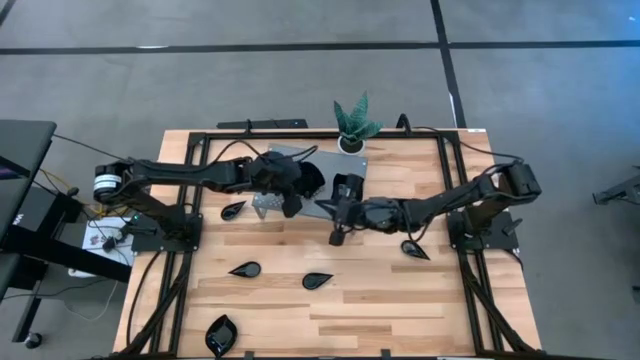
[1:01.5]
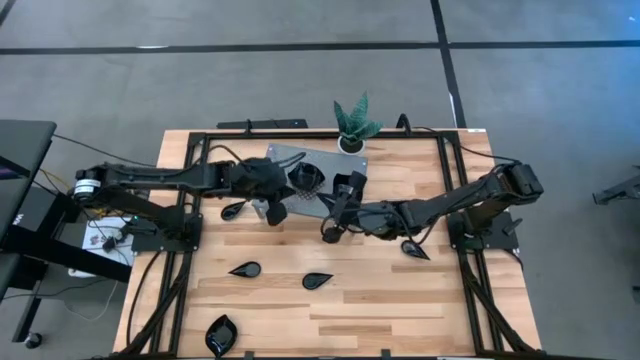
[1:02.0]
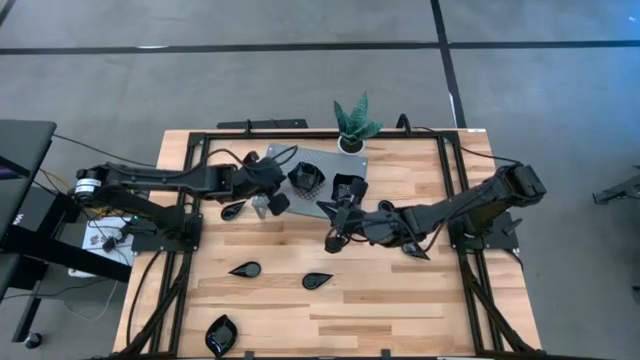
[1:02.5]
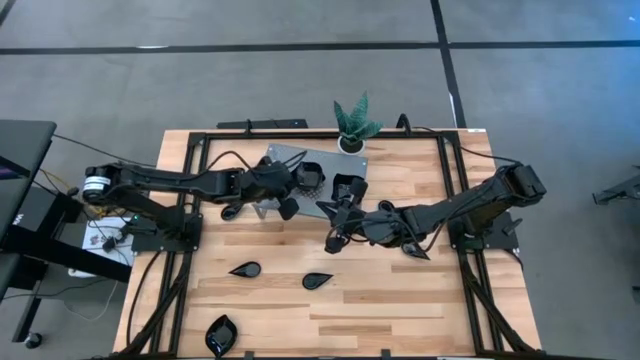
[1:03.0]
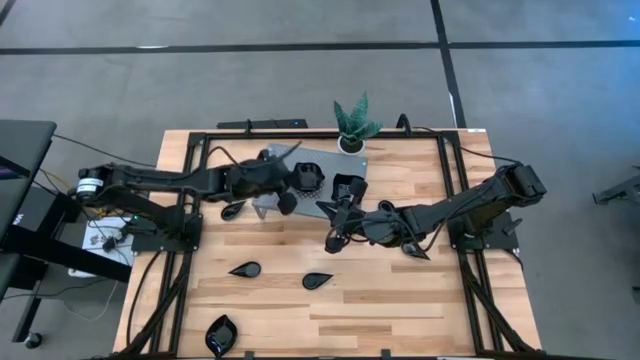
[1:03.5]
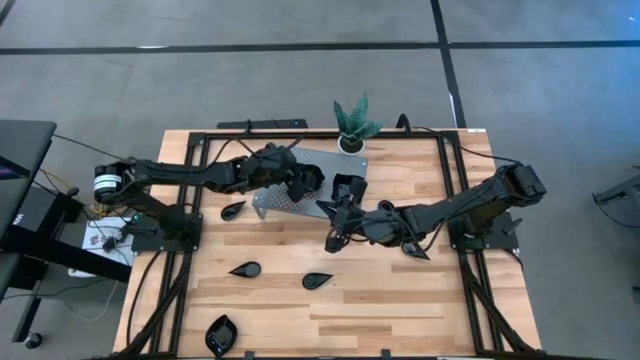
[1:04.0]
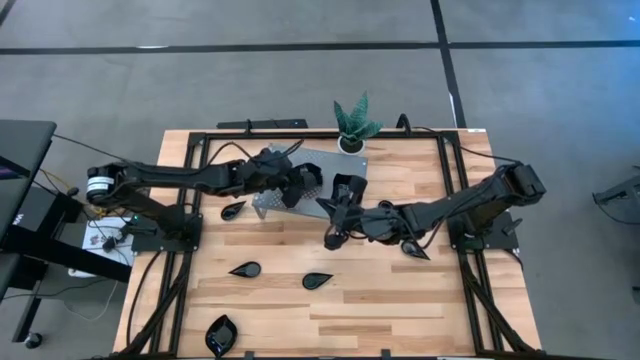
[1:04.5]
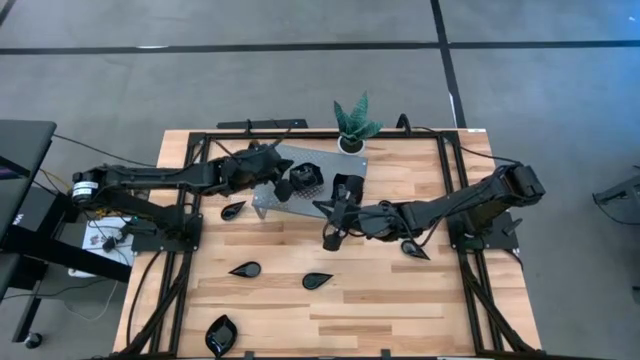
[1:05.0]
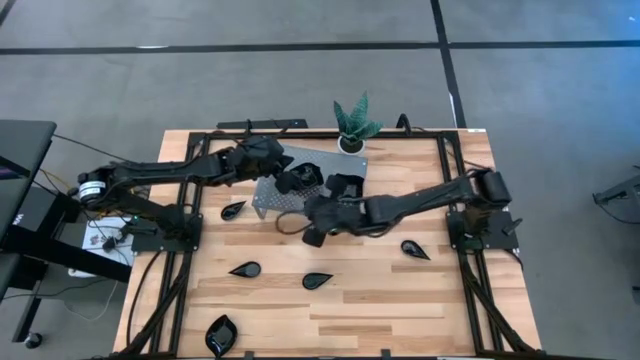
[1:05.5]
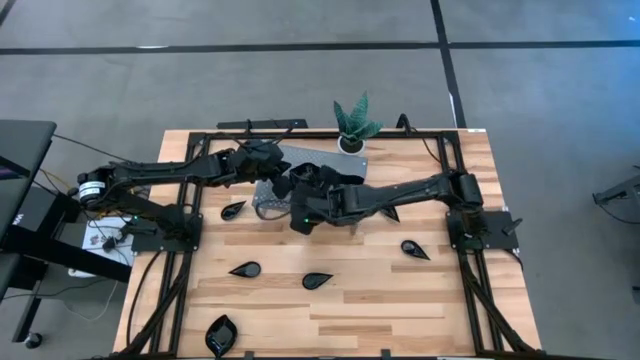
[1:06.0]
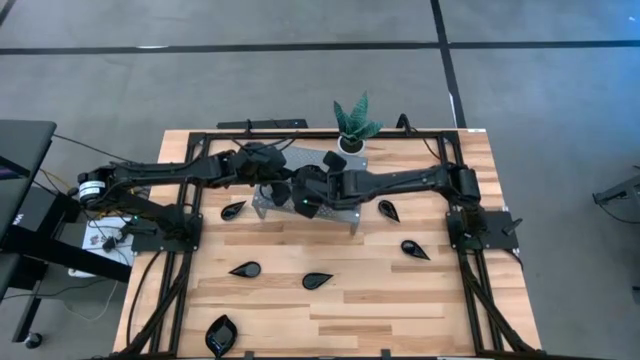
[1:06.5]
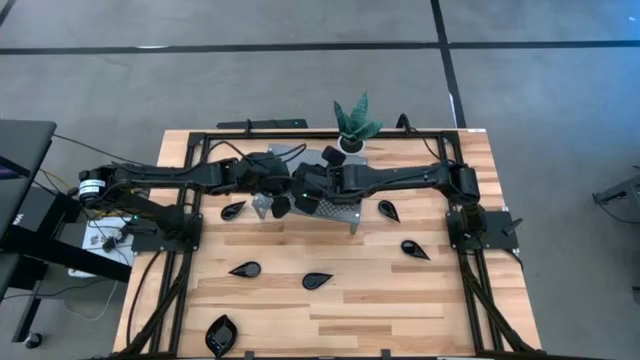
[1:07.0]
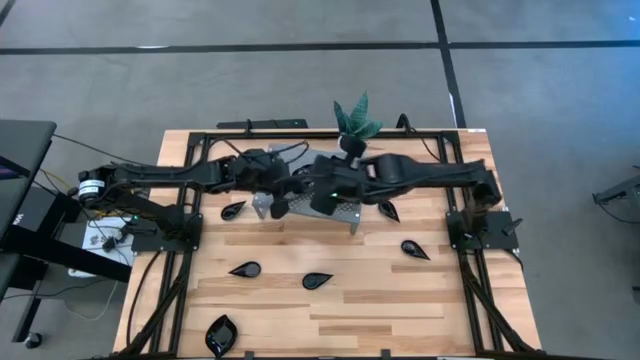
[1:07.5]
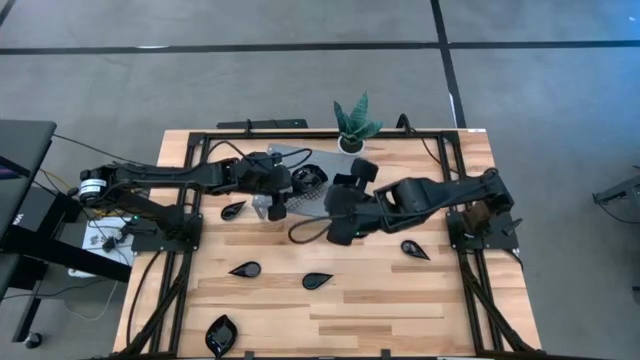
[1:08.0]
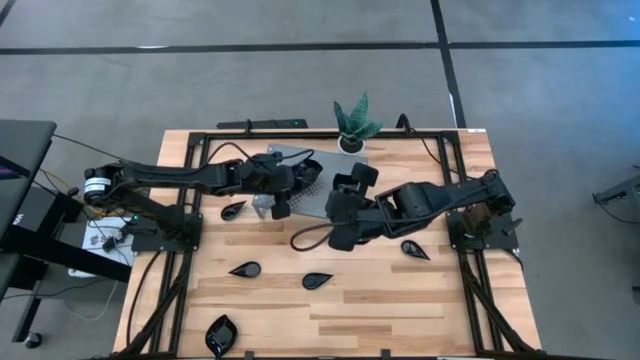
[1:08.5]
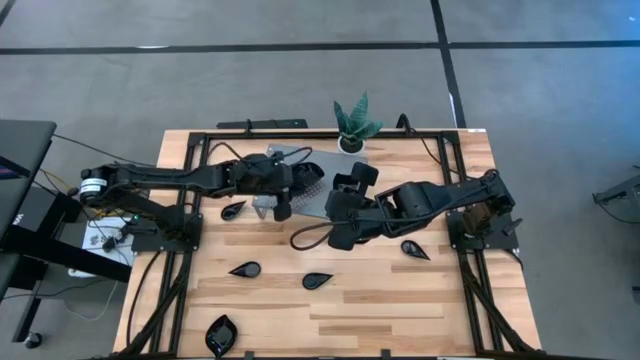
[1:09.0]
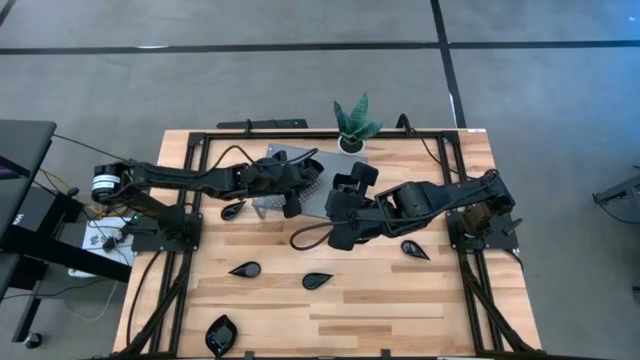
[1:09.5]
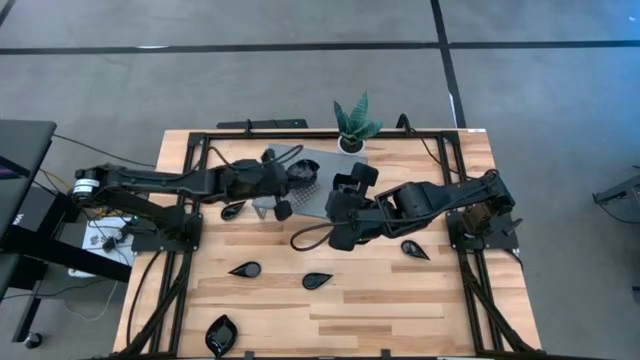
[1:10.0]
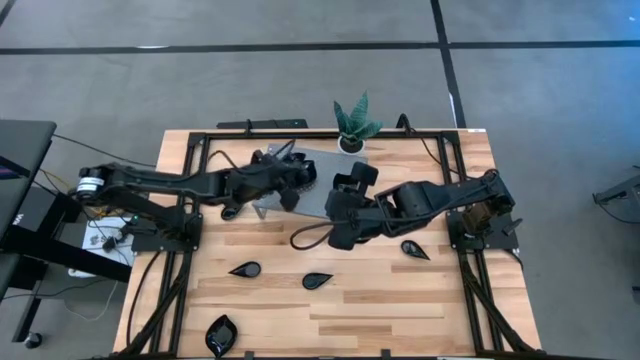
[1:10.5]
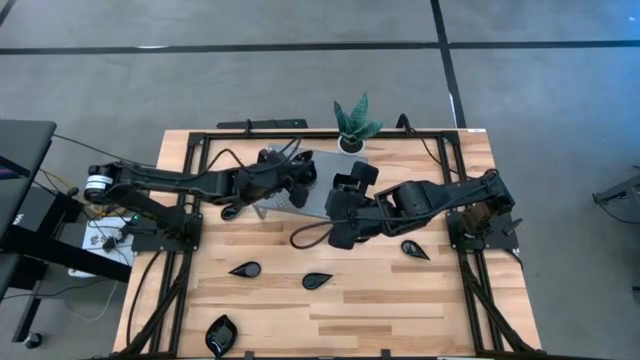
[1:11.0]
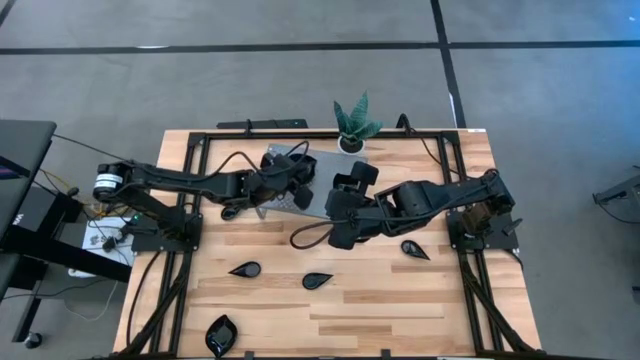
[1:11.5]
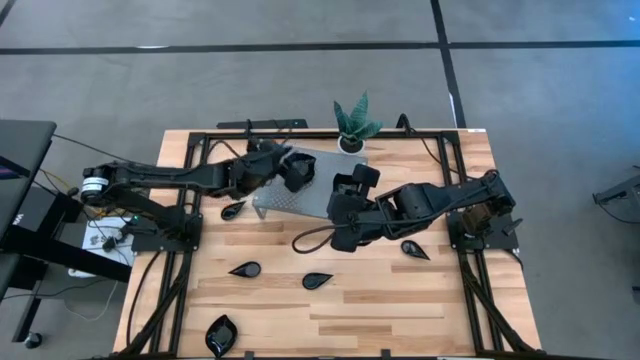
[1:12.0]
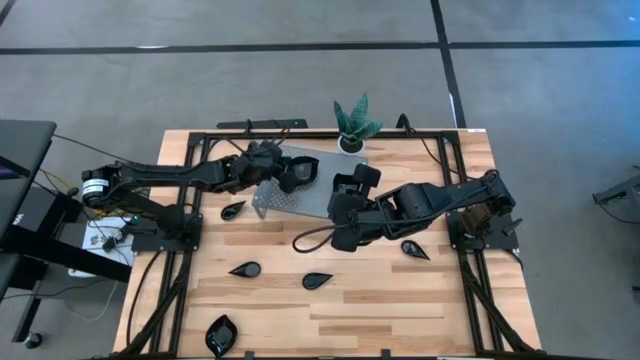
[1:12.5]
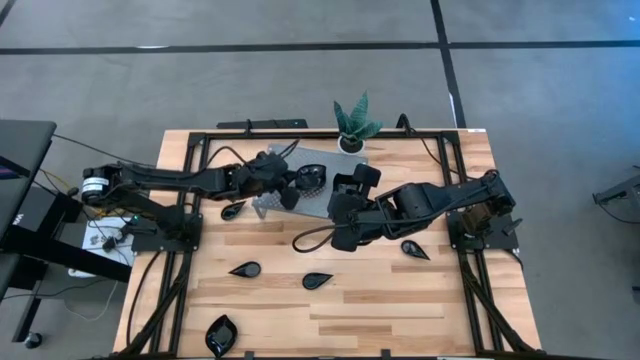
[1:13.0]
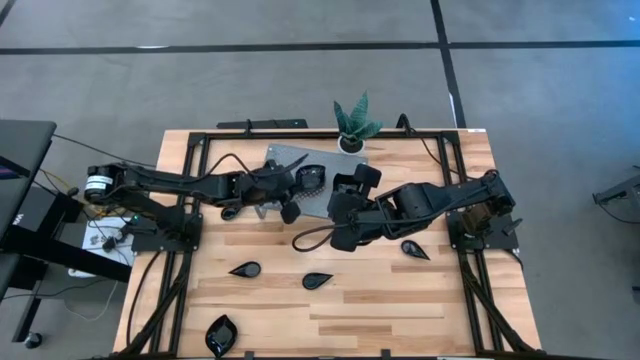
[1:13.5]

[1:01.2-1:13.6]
Task: Pick & Place Mini shaped plates
Stack the leaf shaped plate on top of the leaf shaped plates on the shelf

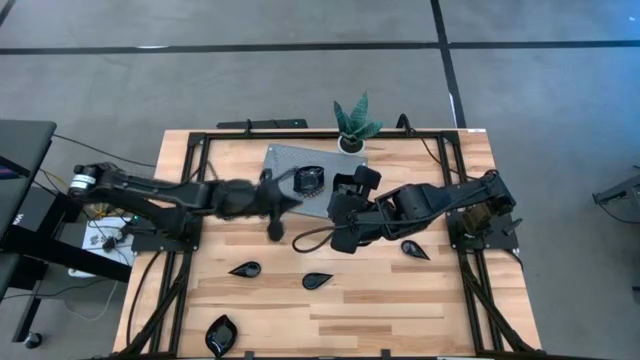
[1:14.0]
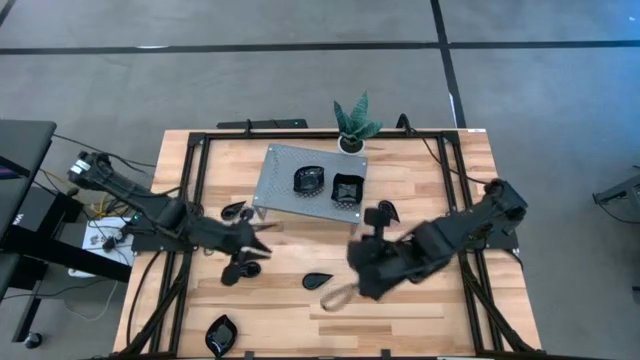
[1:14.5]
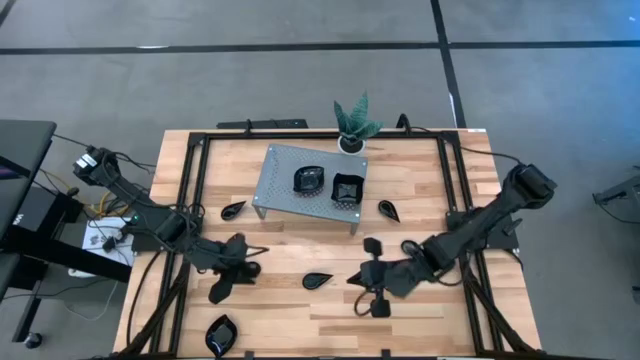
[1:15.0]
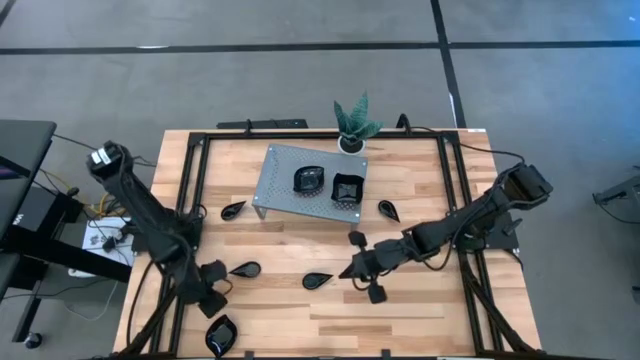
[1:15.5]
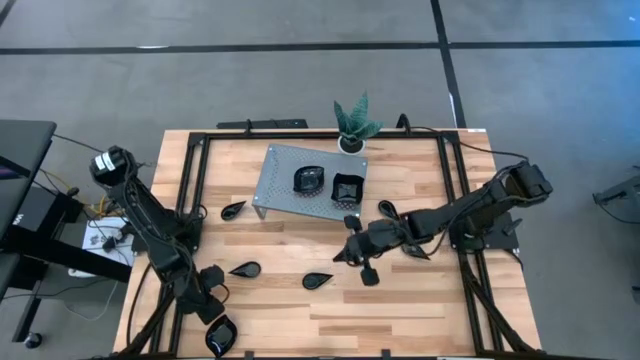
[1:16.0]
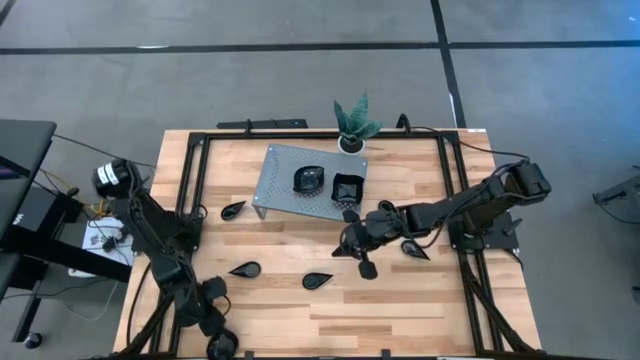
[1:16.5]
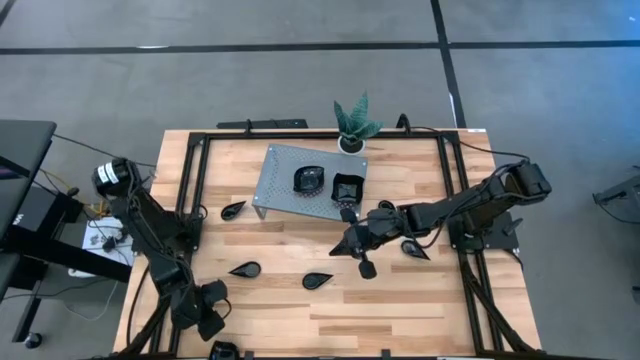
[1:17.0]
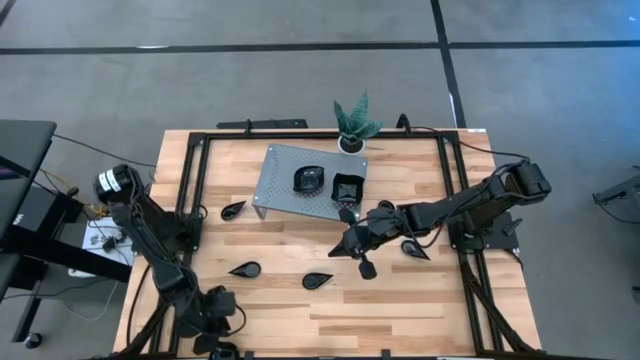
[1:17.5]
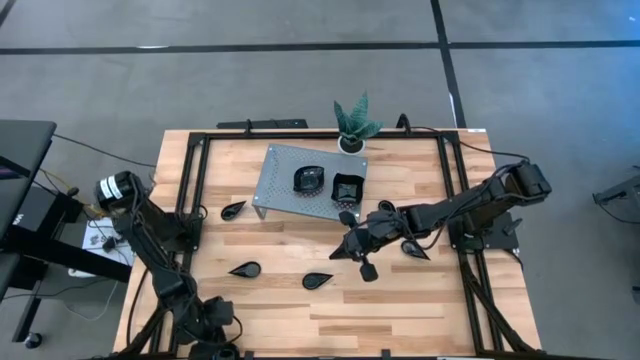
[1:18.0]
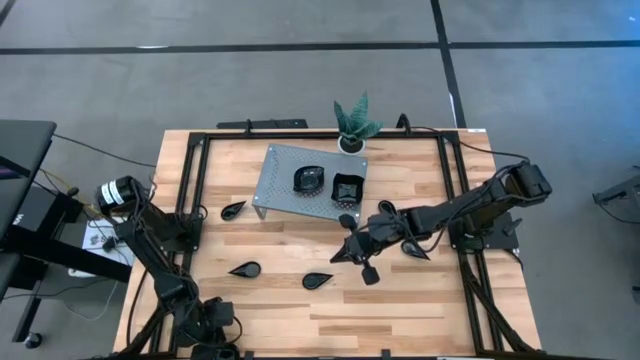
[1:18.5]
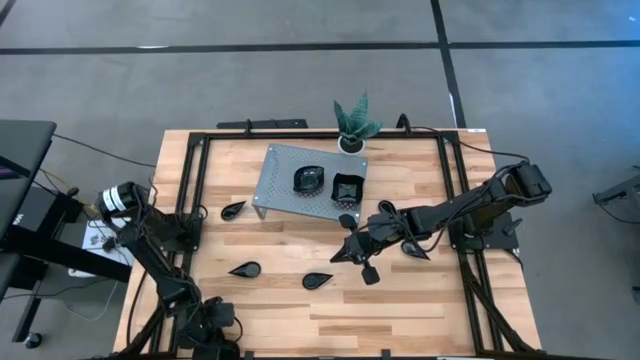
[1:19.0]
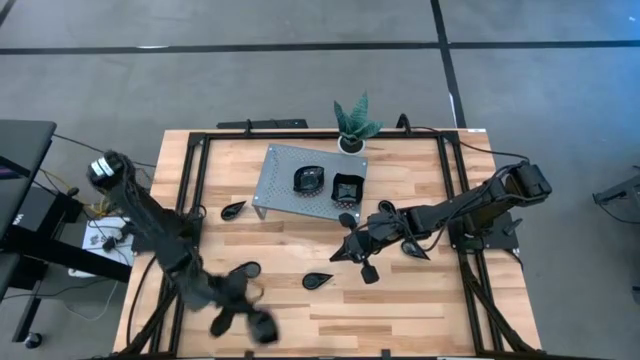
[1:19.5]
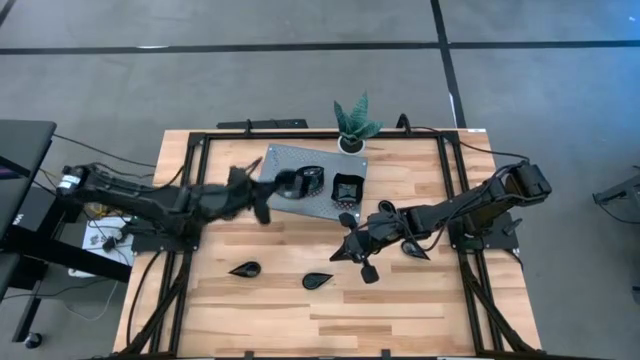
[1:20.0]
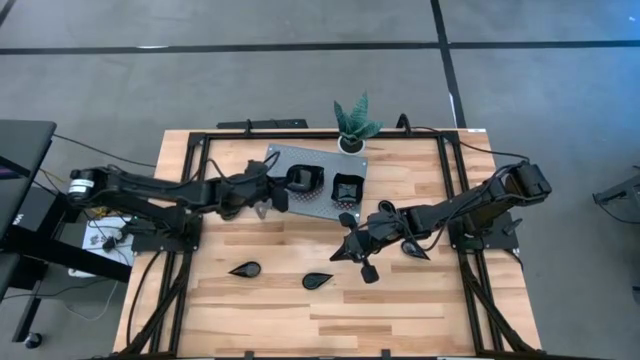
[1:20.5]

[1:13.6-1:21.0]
Stack the leaf shaped plate on top of the leaf shaped plates on the shelf
